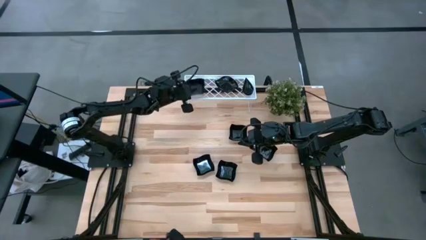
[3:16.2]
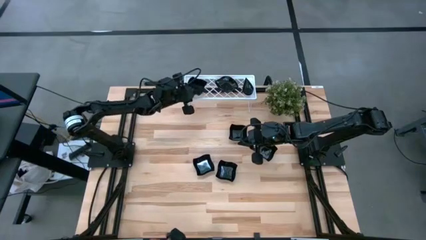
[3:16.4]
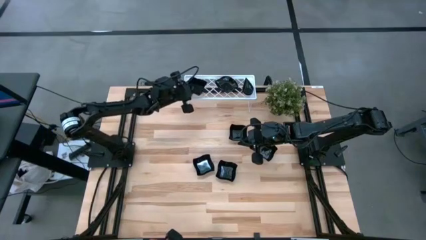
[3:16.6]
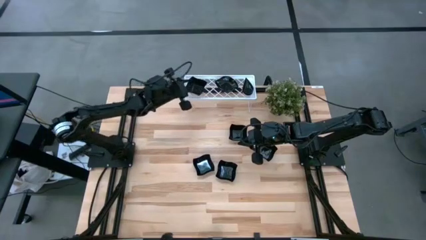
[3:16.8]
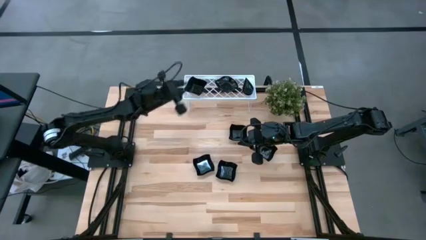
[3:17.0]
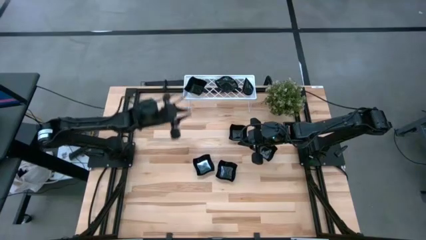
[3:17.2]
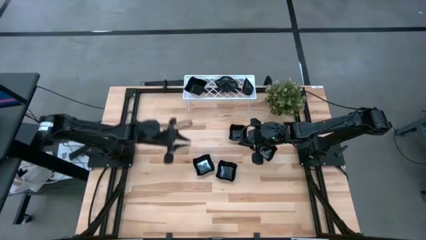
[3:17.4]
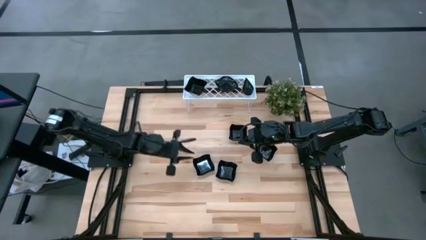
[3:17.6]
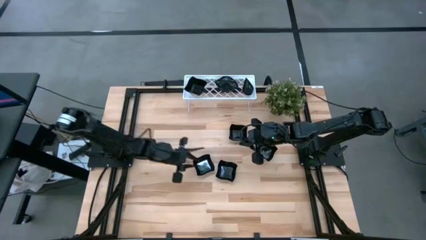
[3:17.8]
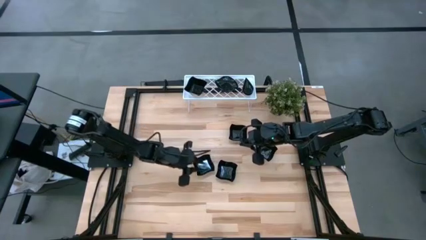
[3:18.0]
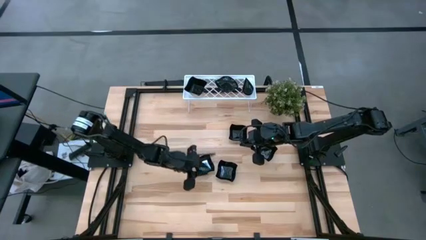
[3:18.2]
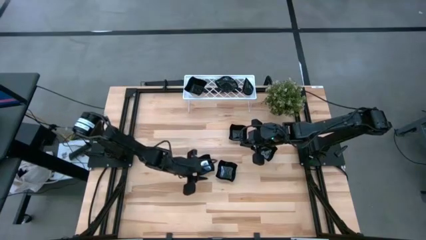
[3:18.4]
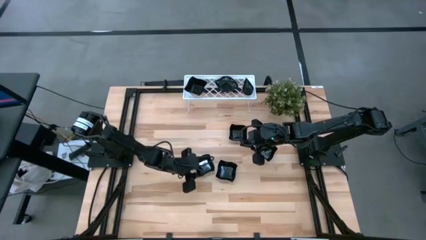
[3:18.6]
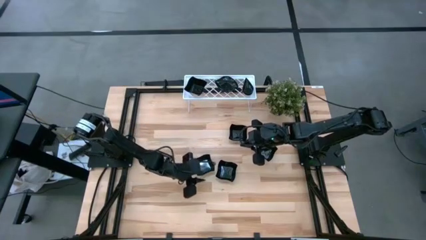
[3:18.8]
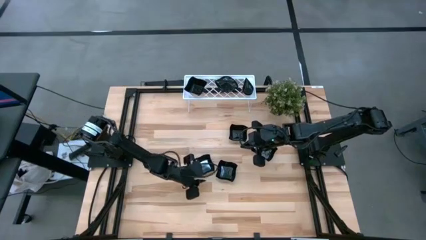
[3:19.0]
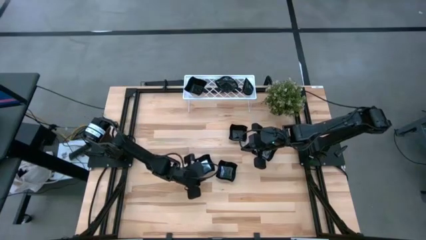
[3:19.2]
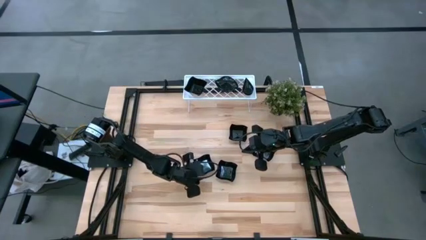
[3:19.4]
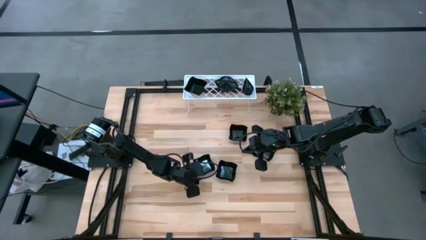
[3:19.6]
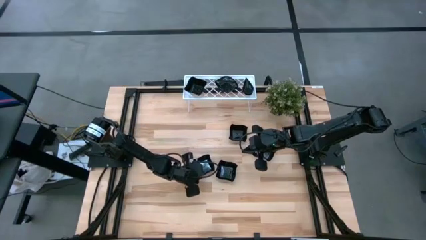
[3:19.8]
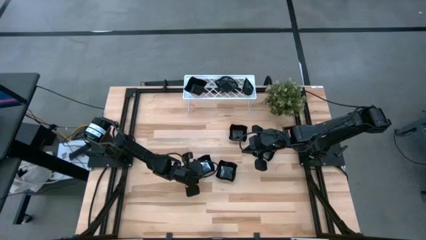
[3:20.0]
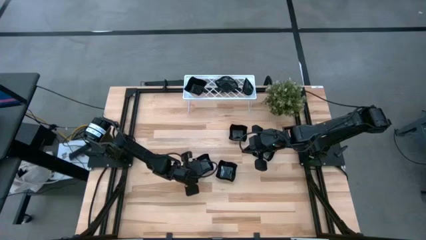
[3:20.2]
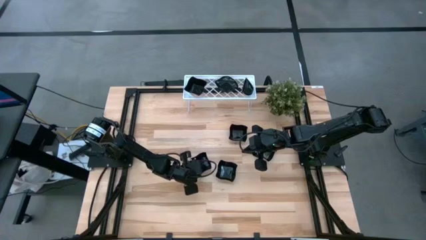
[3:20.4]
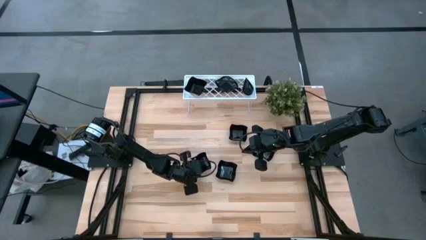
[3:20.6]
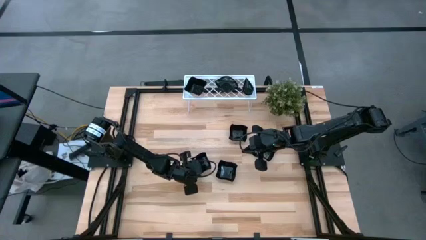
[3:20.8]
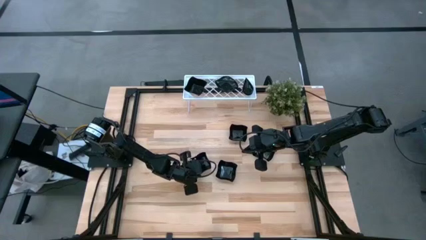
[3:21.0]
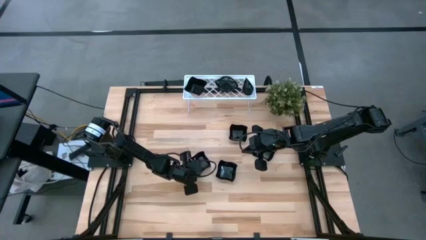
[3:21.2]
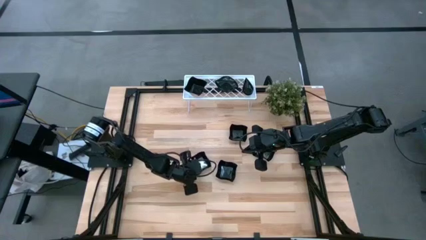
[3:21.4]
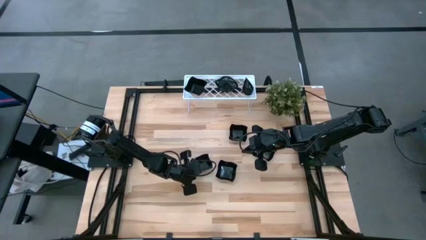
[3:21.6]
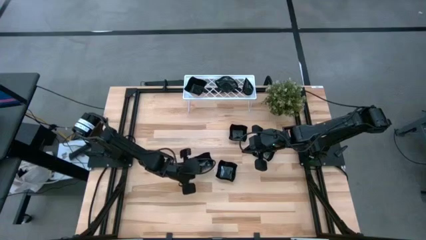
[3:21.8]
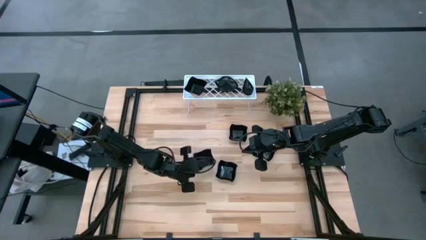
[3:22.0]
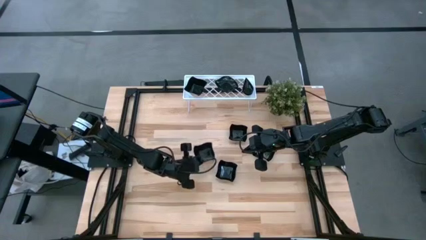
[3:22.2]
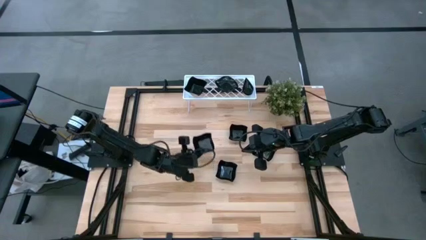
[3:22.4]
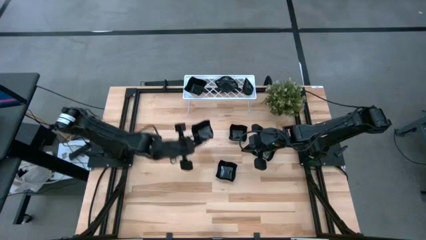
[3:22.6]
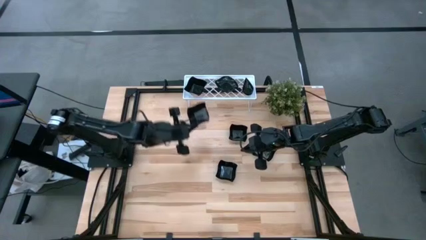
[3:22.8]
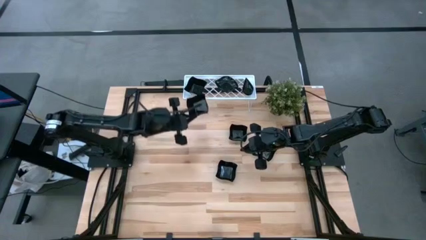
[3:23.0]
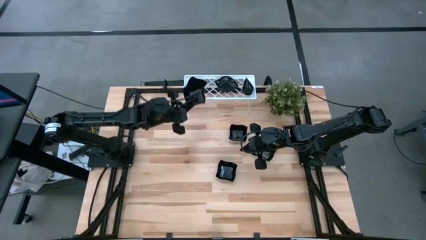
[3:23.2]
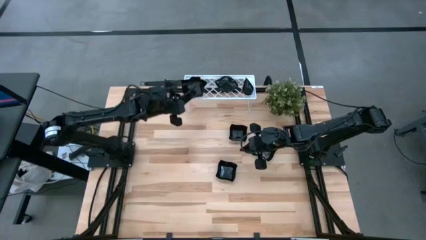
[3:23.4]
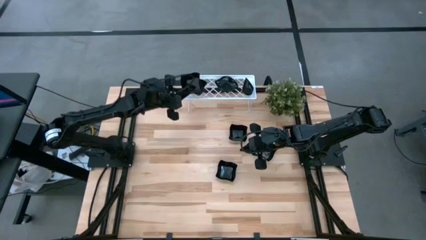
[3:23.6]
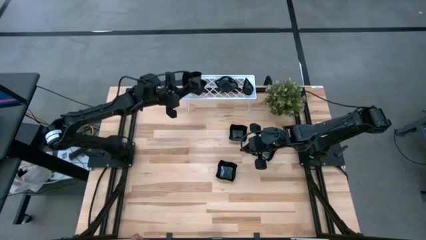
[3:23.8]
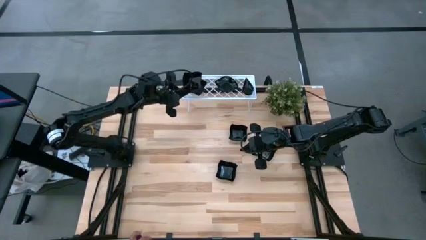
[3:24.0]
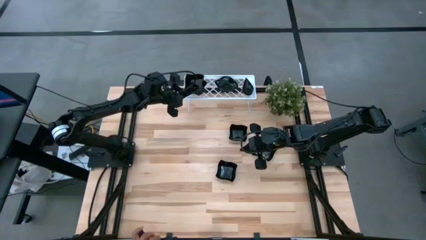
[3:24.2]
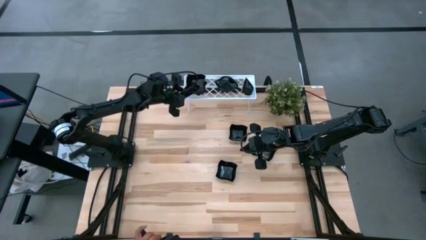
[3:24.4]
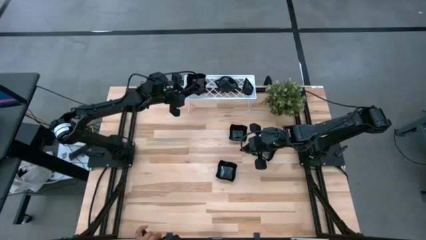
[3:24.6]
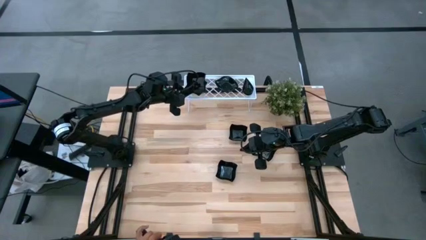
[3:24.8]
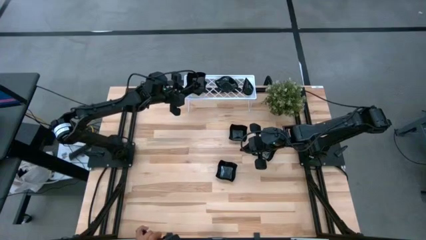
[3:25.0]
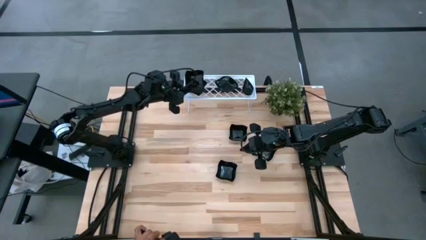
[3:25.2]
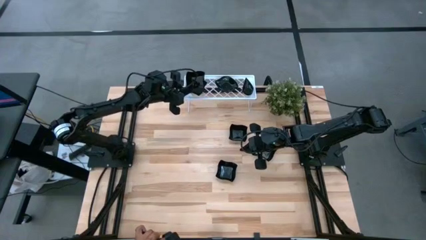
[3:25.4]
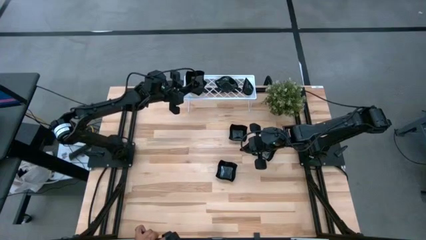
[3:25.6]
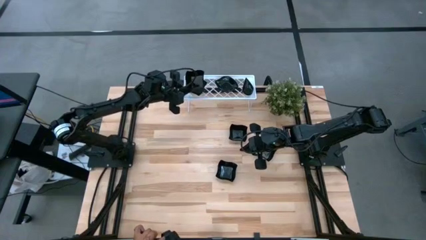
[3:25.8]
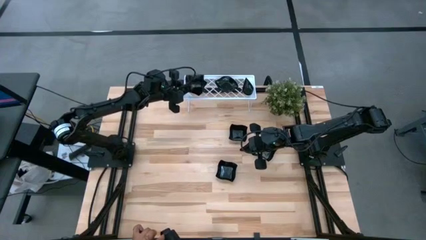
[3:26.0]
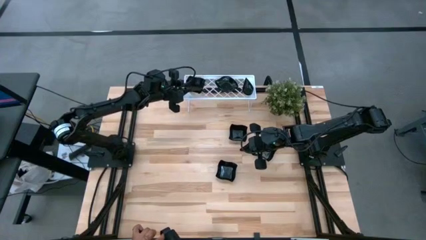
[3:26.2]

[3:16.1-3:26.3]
Task: Pick & Place Mini shaped plates
Stack the distorted square plate on top of the distorted square plate on the shelf

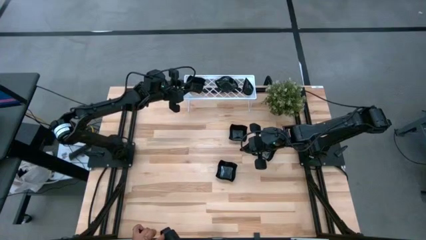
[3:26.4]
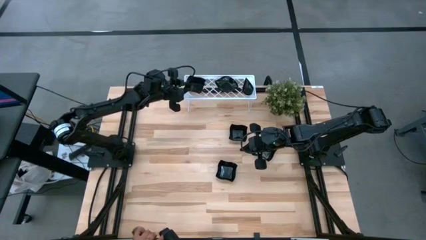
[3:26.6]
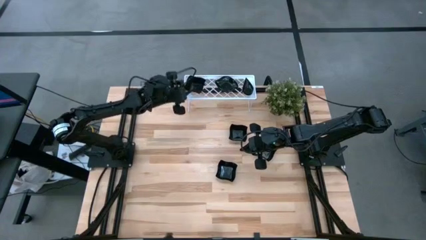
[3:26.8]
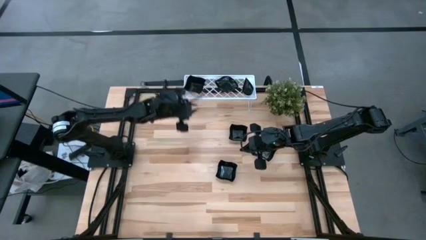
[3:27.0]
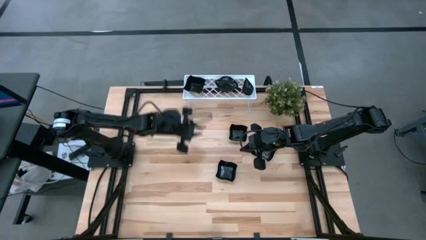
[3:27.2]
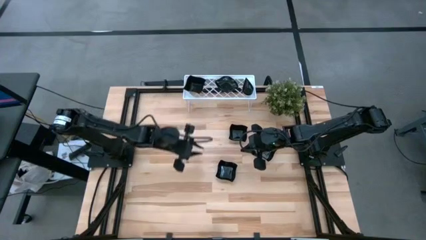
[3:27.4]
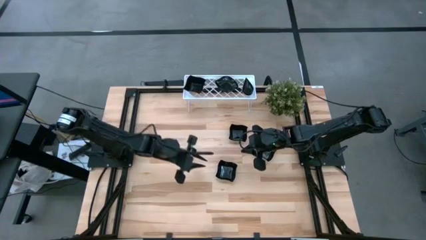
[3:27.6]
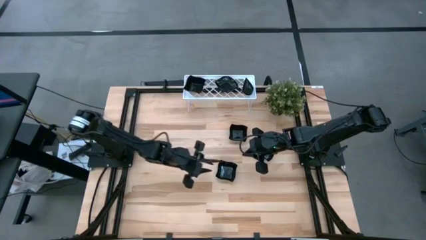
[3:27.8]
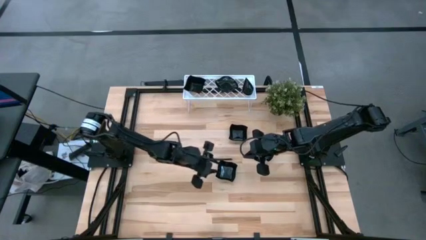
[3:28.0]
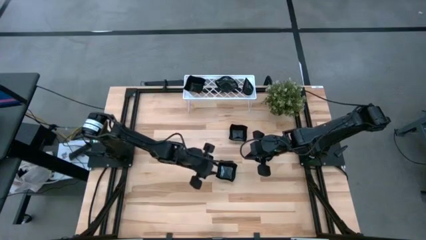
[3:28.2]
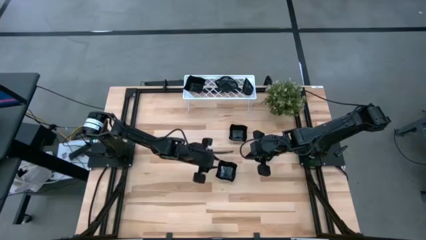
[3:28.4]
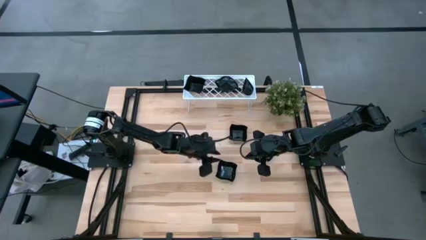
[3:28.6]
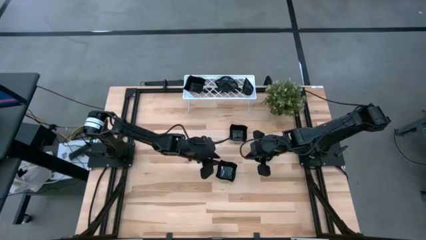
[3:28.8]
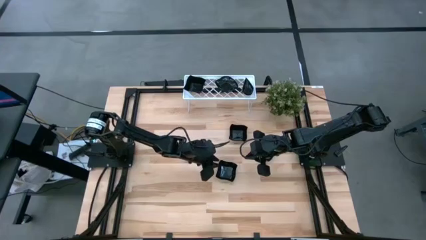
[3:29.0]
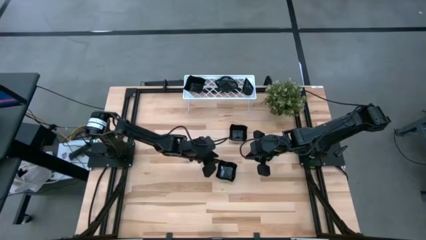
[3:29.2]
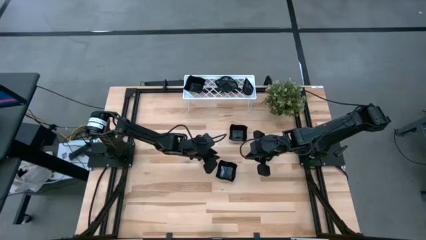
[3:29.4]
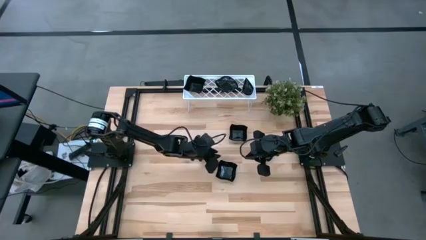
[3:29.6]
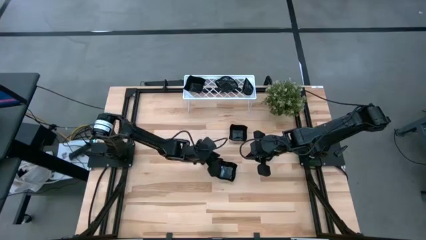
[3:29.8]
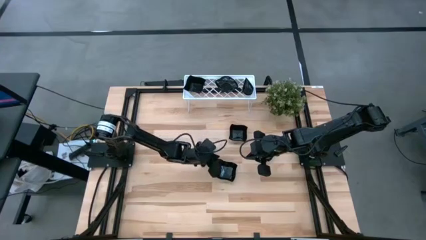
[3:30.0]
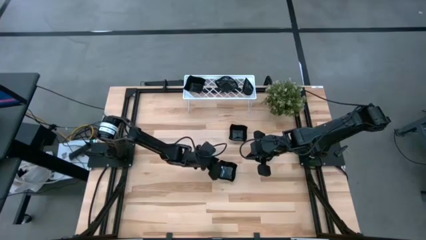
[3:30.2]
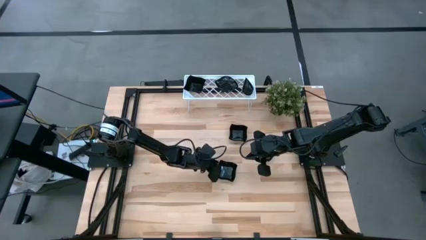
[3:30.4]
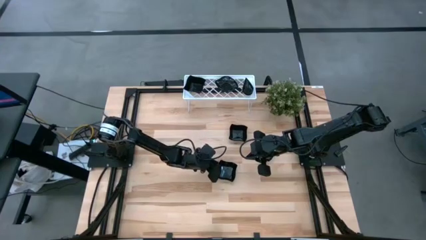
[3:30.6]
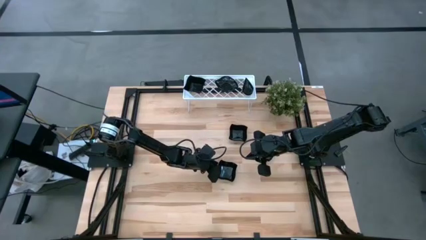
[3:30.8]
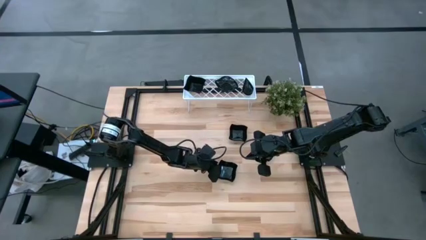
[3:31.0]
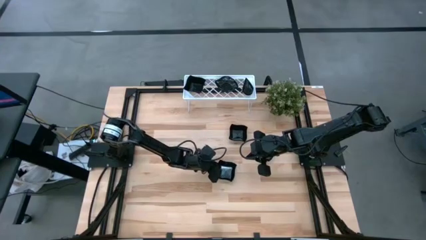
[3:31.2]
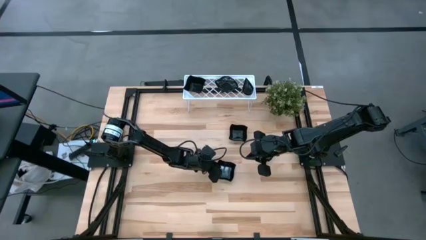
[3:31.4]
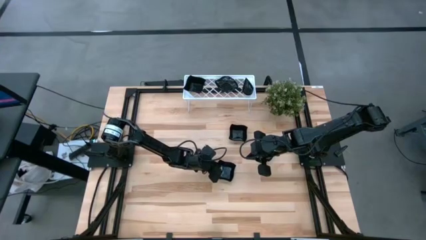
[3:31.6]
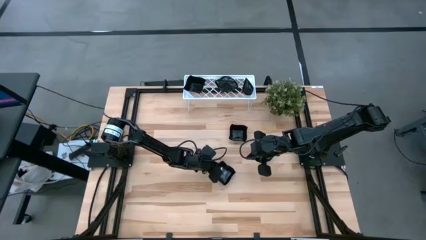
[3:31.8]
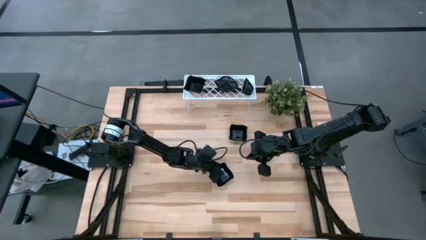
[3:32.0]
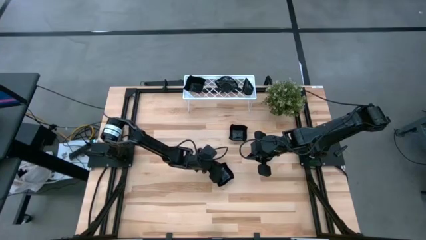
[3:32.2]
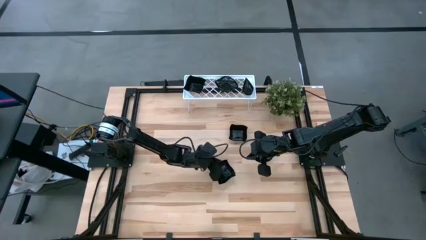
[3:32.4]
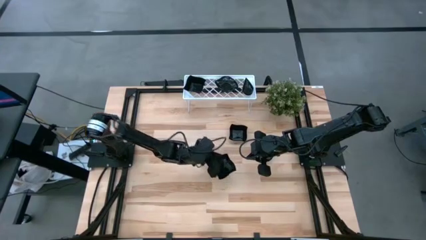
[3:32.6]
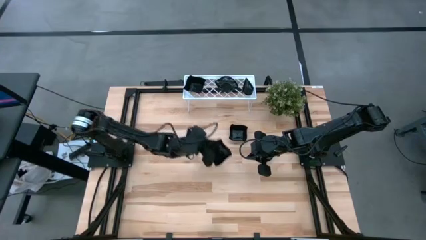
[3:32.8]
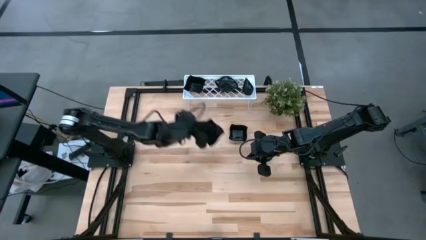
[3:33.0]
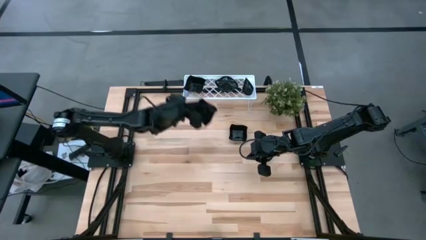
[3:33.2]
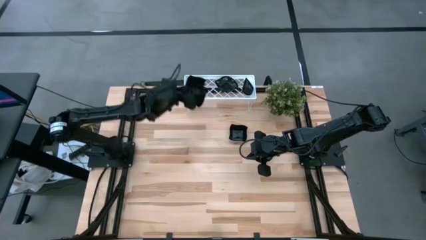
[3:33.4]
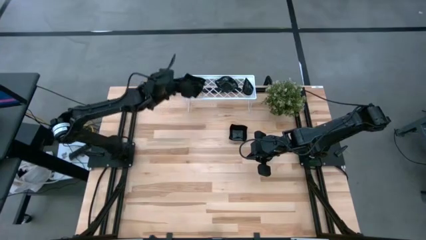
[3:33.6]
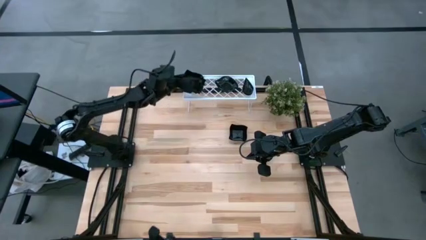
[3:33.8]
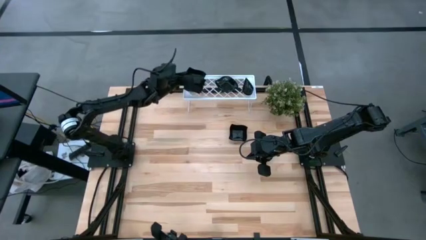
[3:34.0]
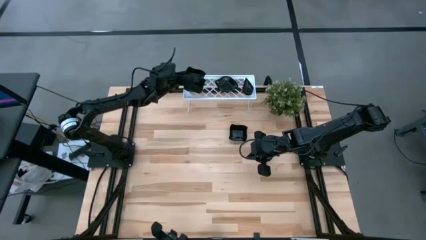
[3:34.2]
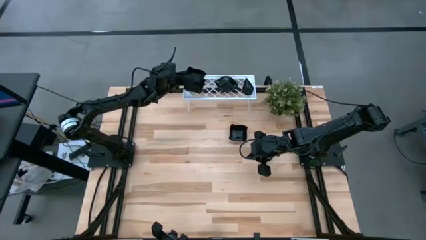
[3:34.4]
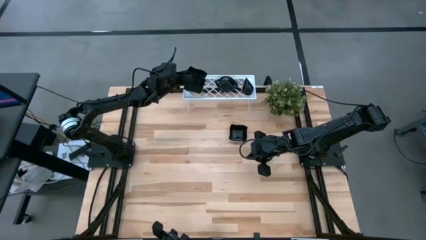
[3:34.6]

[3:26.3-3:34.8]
Stack the distorted square plate on top of the distorted square plate on the shelf
